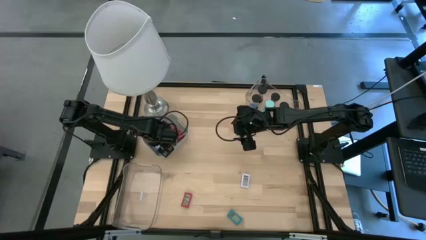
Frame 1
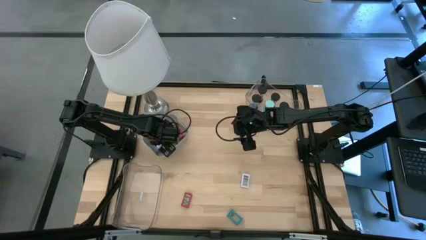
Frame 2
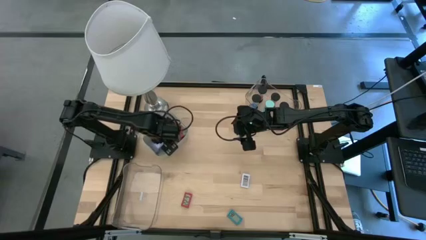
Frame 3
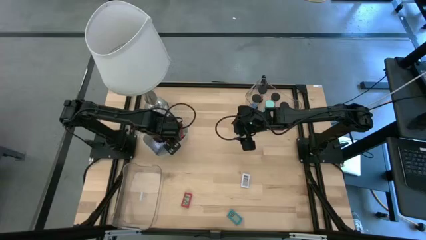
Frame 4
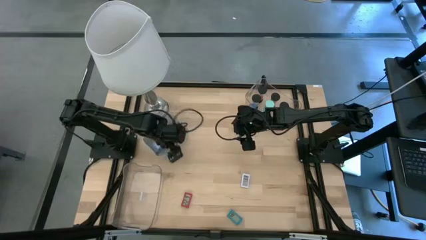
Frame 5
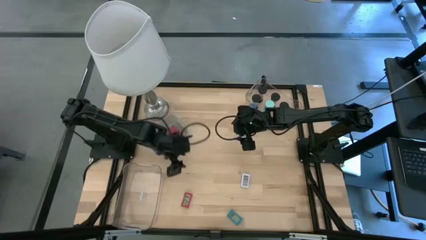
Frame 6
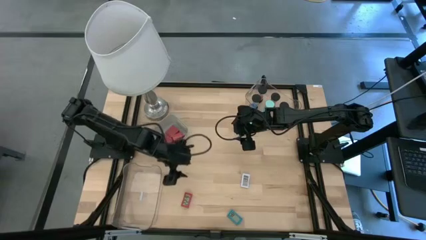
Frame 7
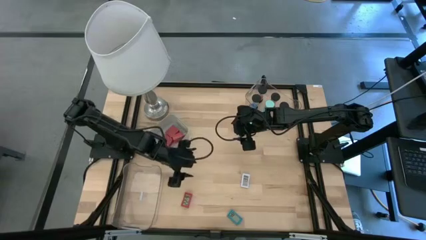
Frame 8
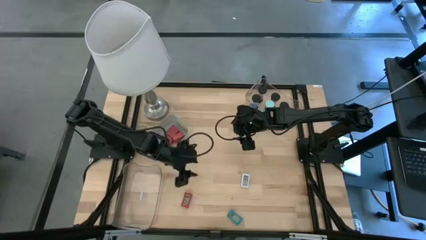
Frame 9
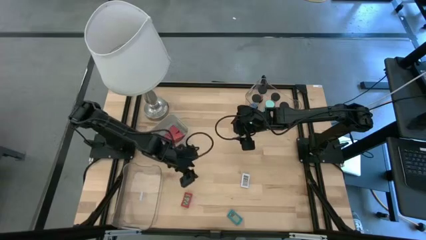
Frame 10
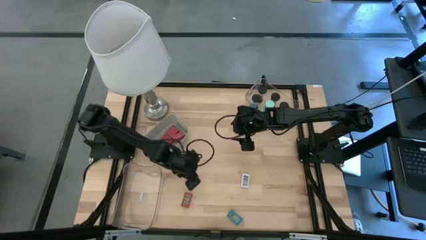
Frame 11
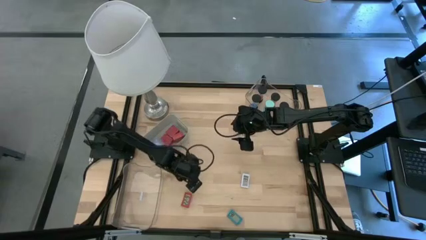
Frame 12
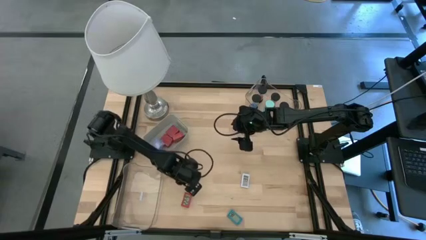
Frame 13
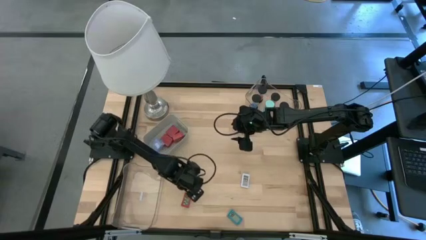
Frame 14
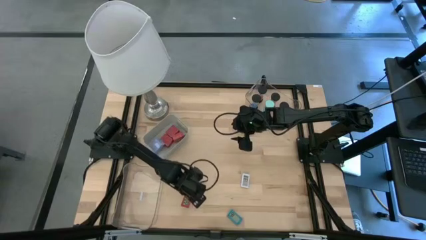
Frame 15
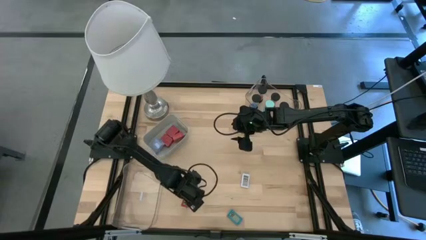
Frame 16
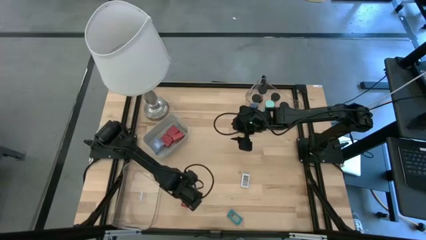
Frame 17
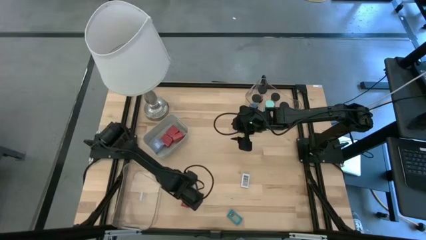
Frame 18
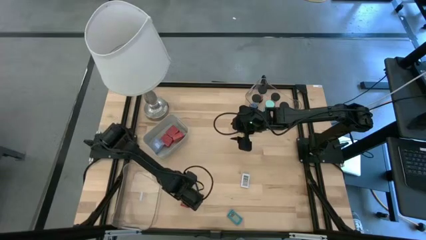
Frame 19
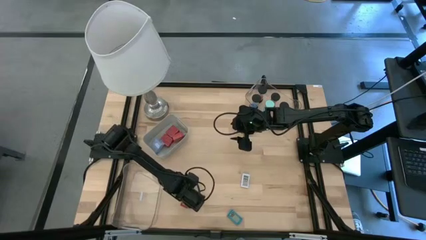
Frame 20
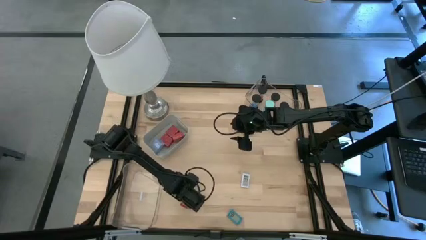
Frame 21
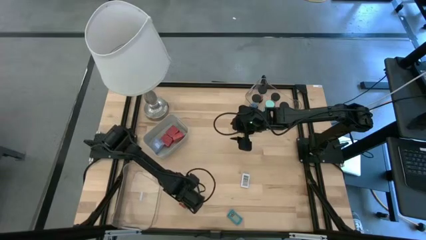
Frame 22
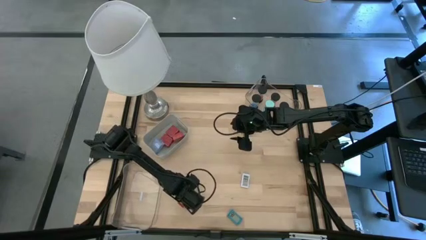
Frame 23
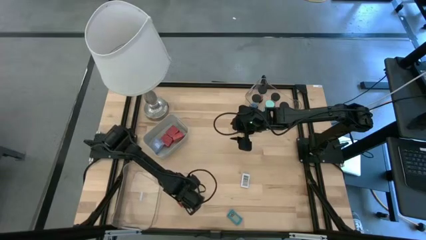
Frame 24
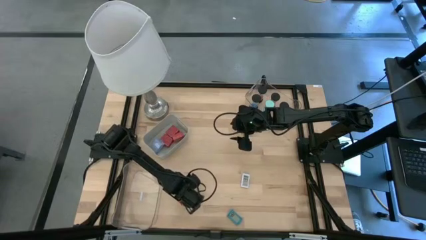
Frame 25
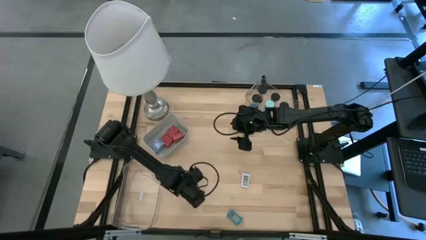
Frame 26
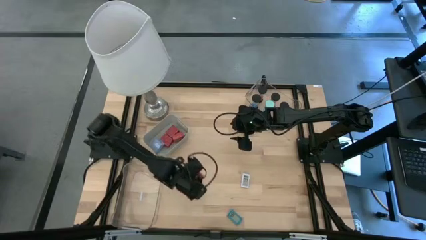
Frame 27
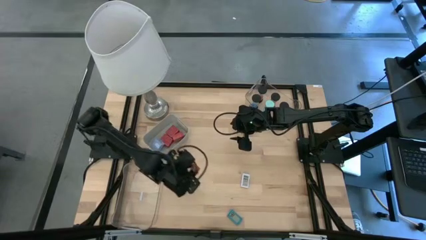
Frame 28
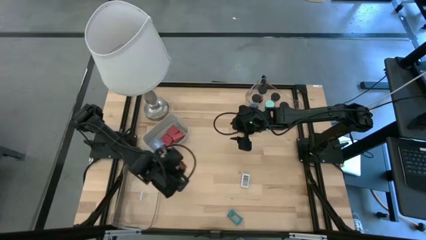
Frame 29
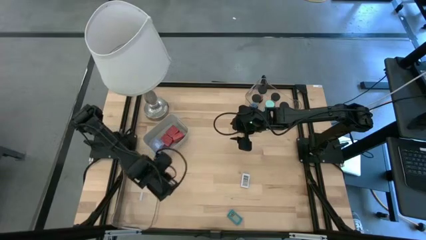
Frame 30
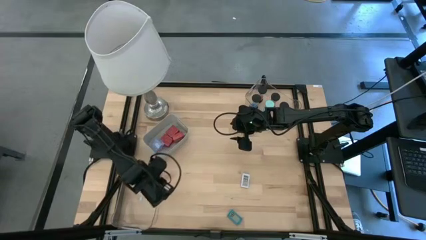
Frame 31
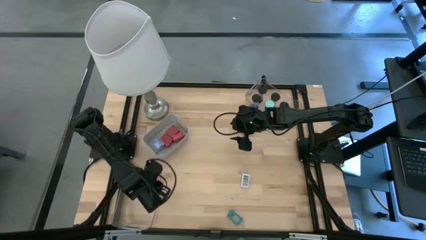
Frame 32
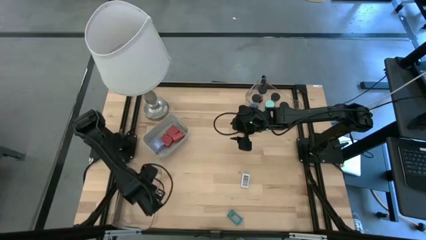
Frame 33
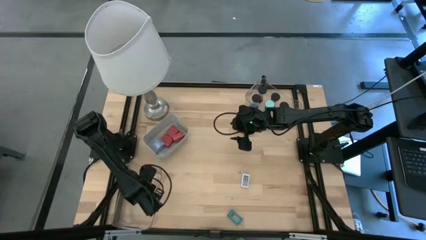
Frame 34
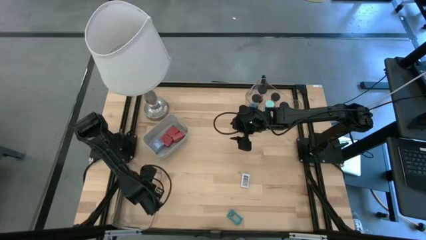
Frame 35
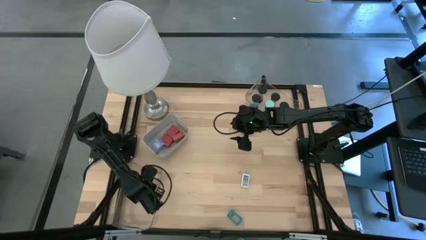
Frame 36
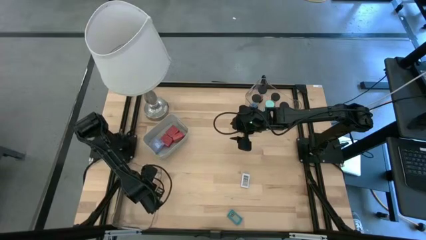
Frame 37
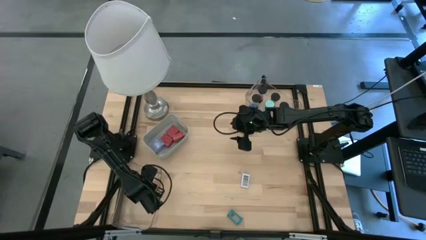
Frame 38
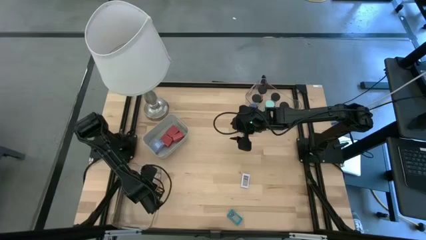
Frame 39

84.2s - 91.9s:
Task: Pick & Place Office items
Put the red digital timer into the bottom transparent bin

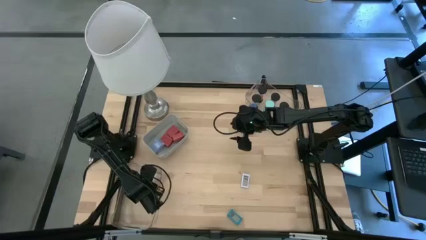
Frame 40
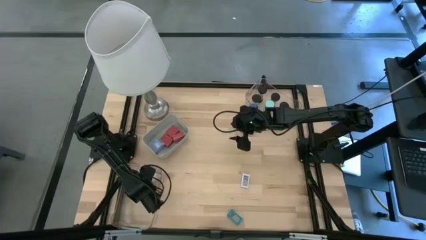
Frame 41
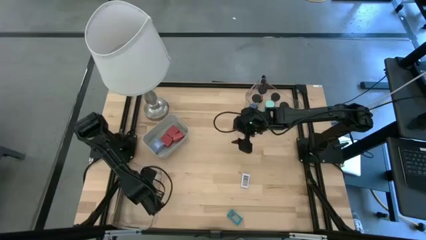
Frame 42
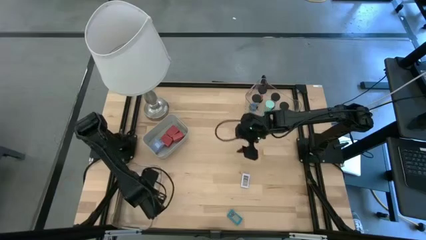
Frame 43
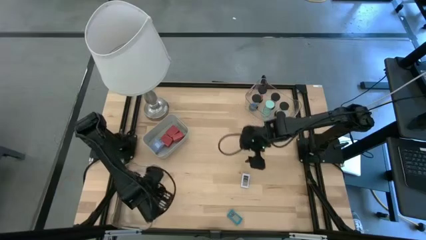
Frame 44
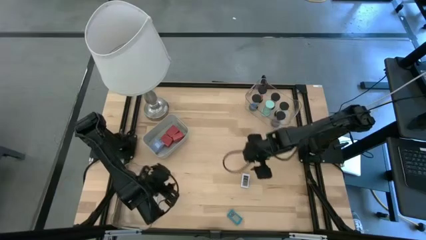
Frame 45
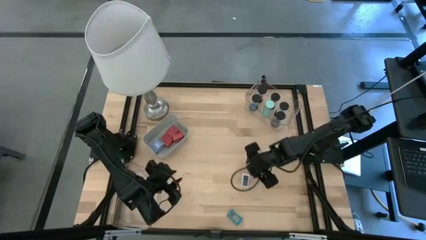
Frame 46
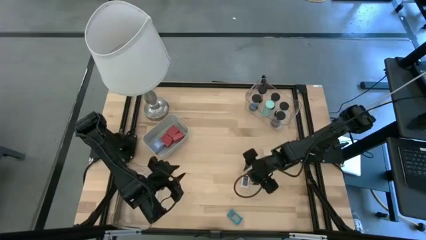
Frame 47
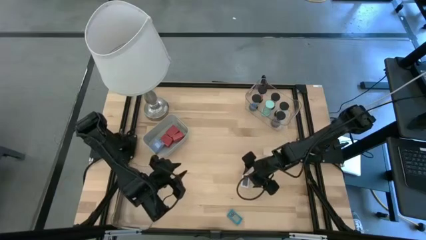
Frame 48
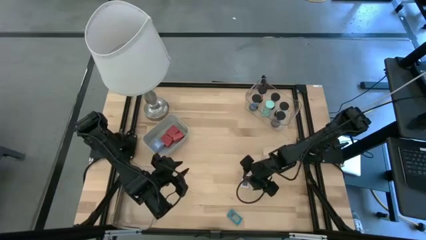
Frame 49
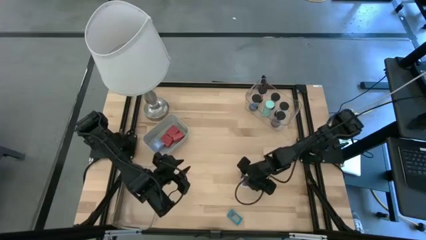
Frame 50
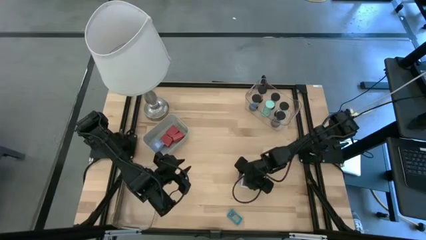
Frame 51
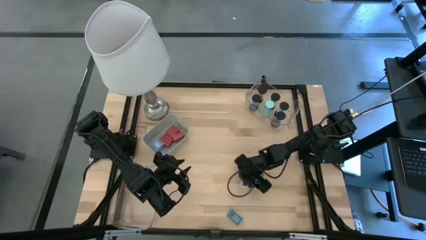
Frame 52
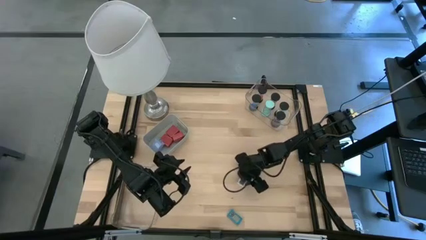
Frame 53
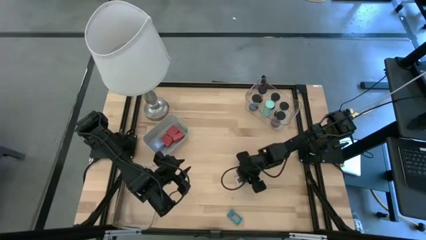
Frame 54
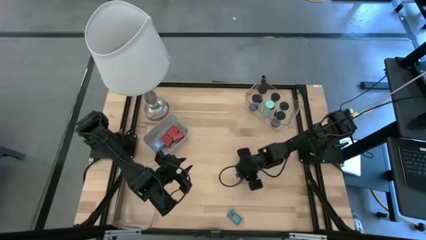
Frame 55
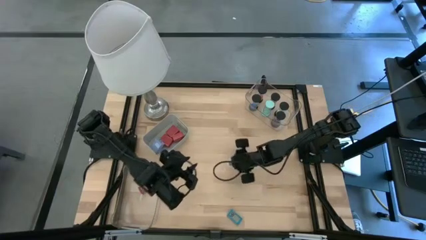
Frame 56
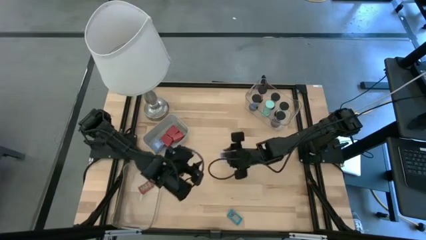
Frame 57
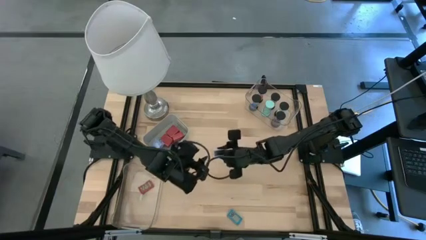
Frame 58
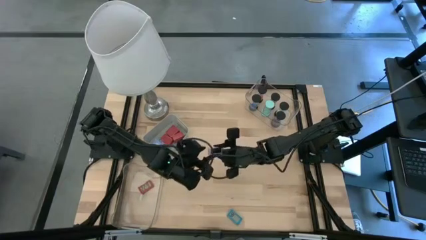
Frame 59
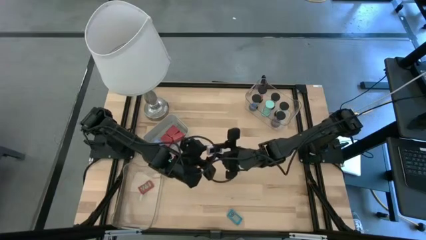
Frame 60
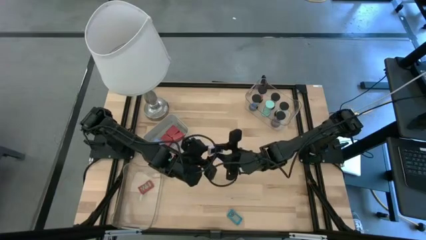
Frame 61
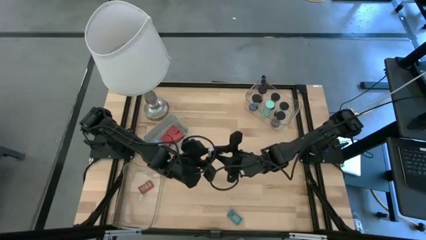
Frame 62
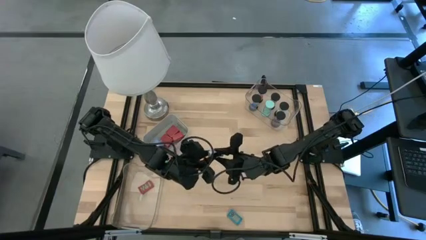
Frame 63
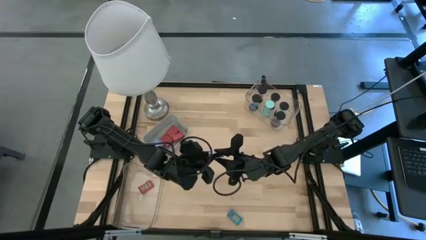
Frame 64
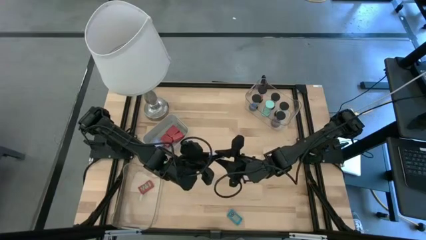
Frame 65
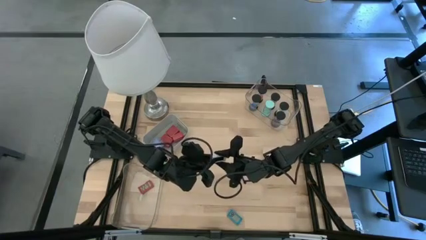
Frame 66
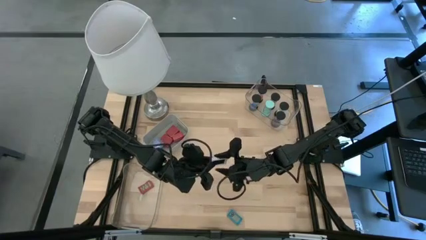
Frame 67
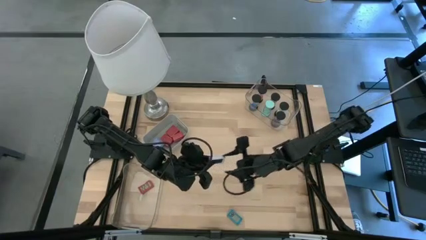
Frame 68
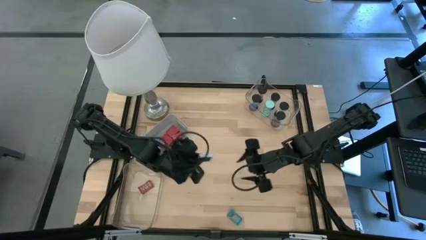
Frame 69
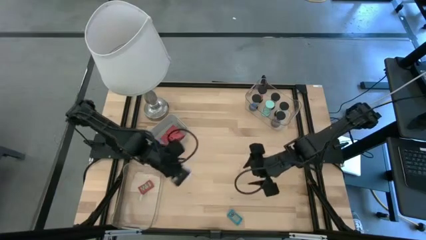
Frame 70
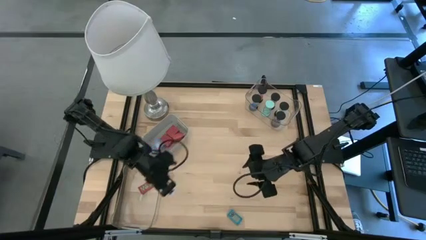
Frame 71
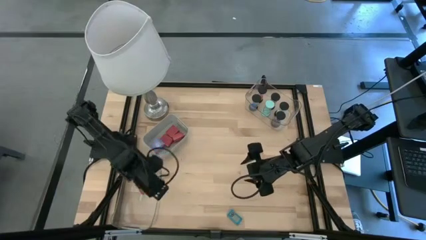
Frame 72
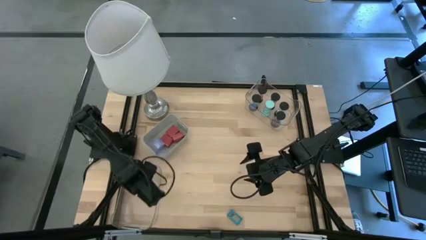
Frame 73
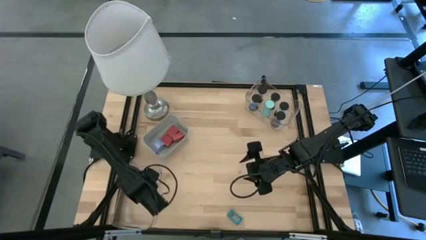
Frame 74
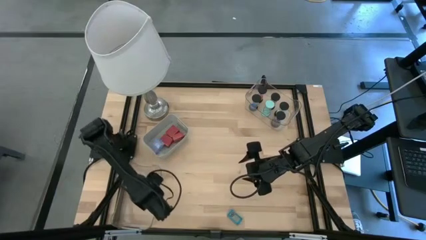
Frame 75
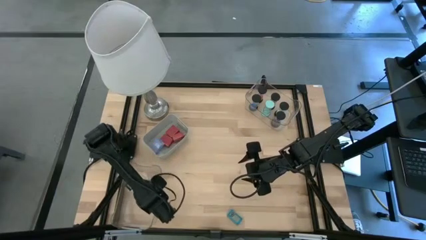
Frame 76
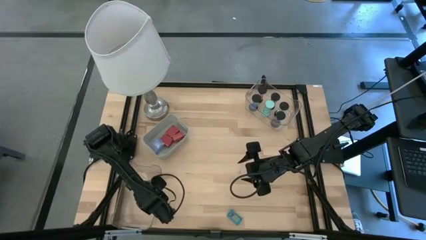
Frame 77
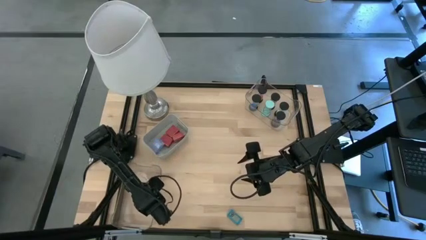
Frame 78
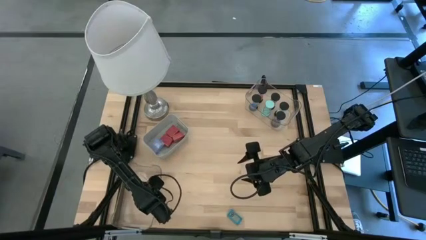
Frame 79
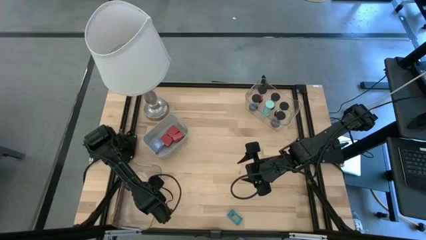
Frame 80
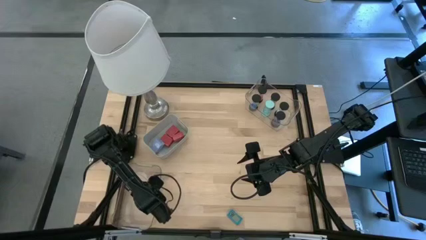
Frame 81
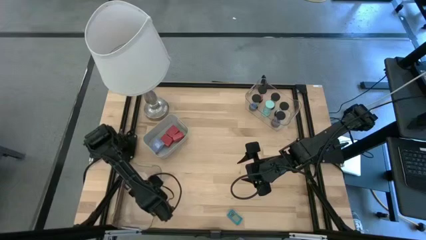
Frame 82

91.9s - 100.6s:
Put the white digital timer into the bottom transparent bin
